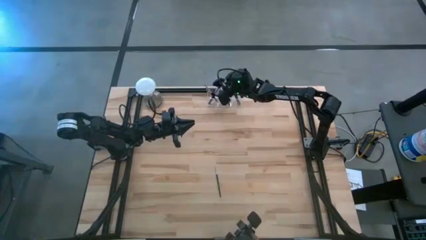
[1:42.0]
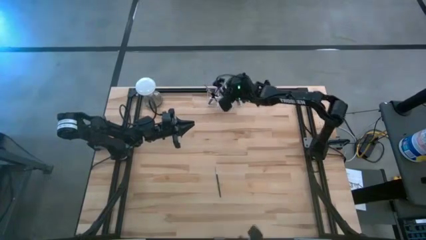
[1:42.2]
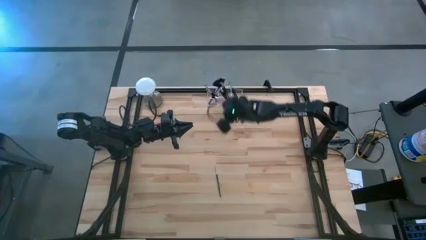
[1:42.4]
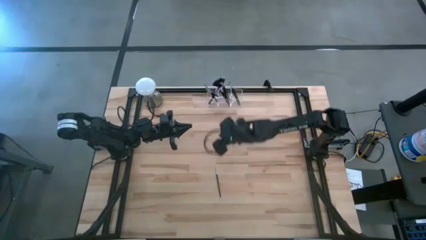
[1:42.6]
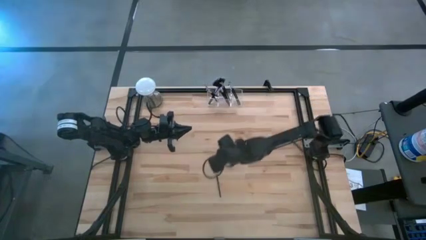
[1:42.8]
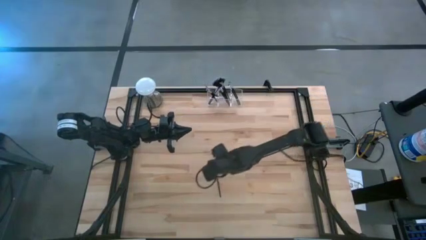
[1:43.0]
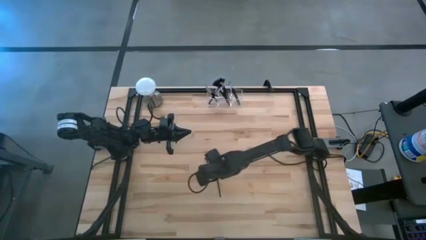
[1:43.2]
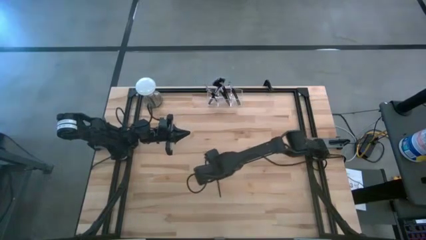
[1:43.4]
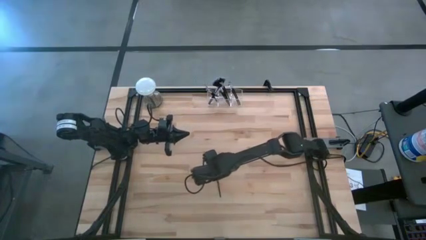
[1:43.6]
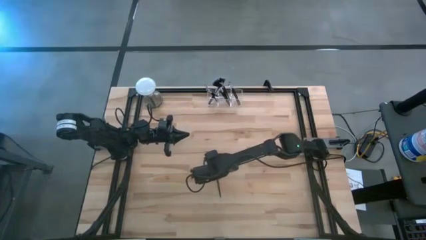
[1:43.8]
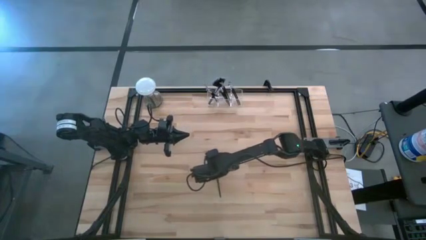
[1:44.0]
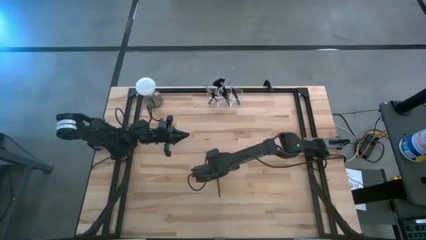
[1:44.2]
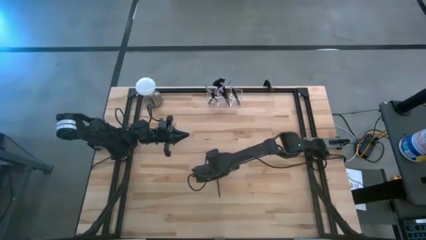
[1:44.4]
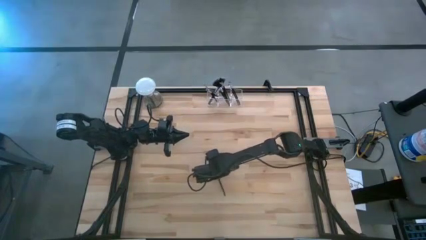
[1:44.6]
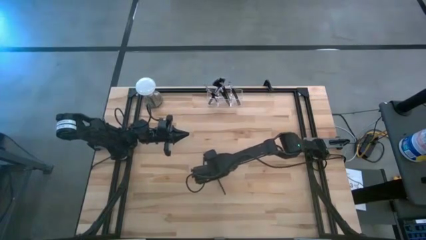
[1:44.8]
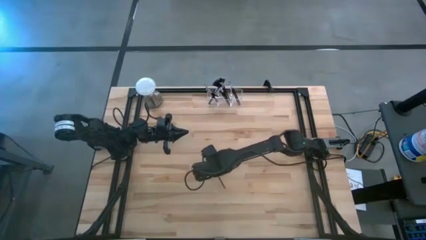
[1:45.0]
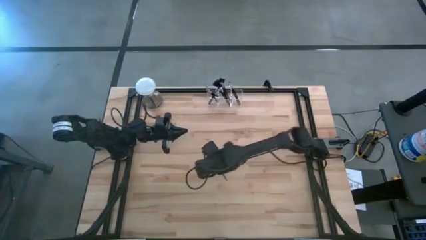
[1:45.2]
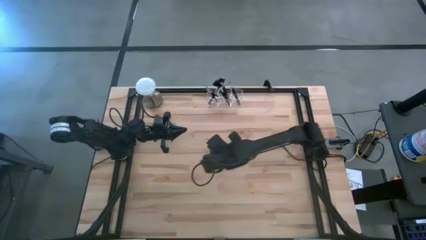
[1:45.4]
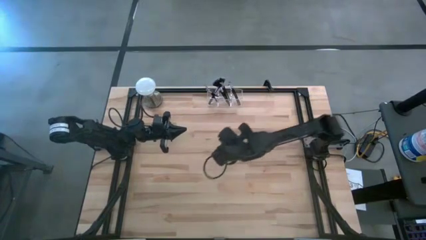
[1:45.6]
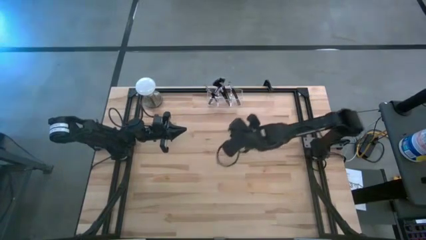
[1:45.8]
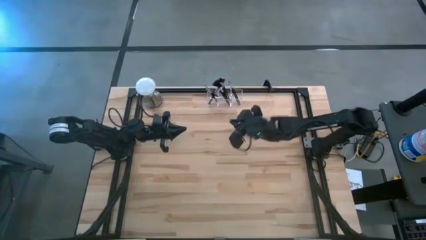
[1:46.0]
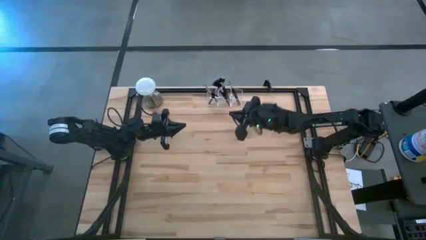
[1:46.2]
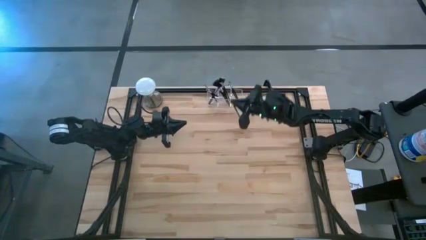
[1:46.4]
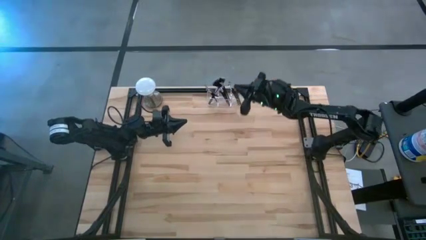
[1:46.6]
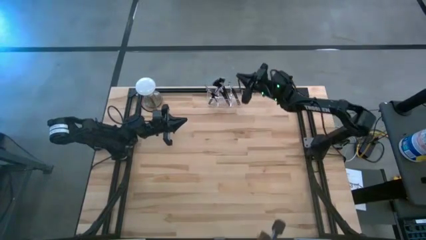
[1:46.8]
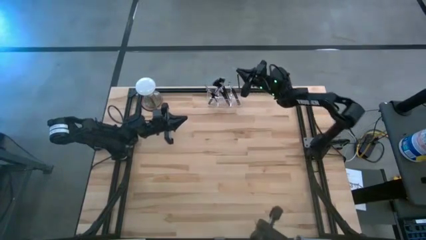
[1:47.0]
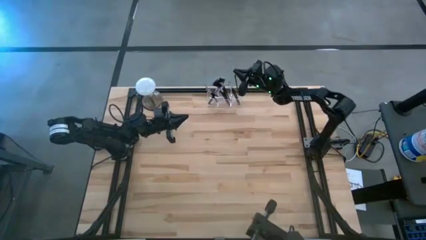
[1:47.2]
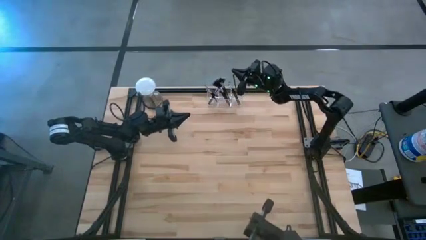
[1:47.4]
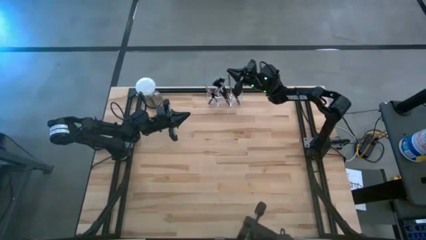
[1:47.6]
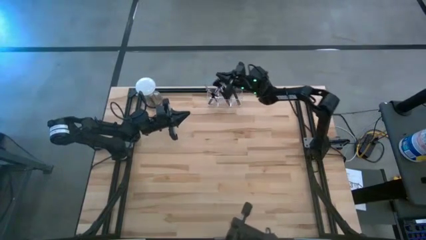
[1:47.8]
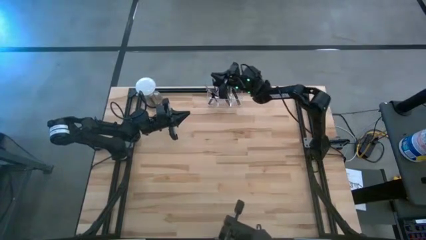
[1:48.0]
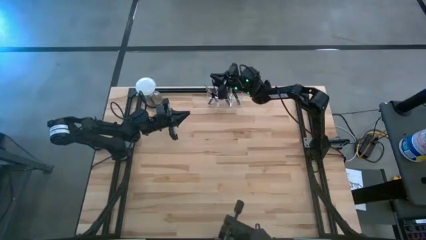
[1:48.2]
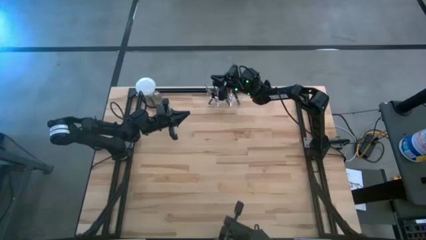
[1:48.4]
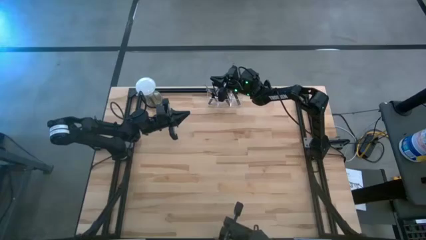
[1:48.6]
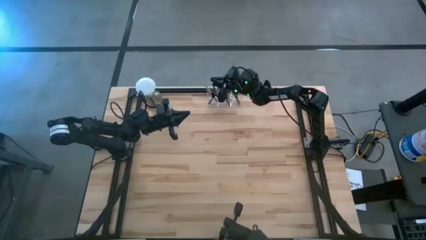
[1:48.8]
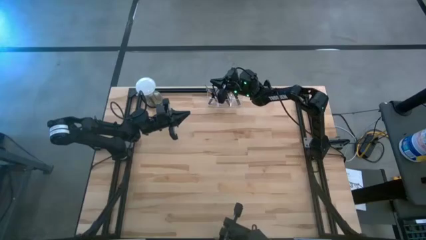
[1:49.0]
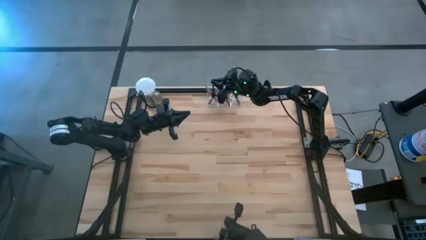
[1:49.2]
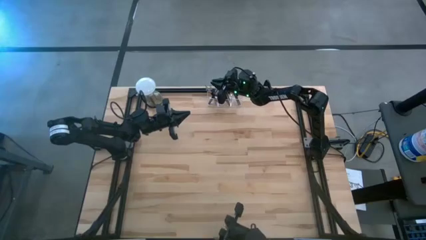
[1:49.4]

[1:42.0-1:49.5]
Task: Pick & Place Makeup Brushes
Put the black liner brush into the transparent organizer

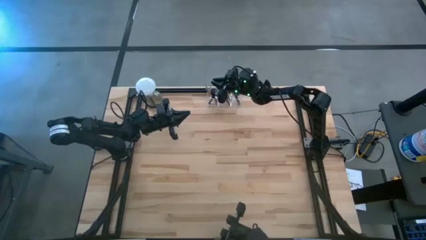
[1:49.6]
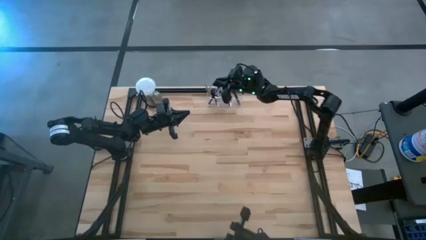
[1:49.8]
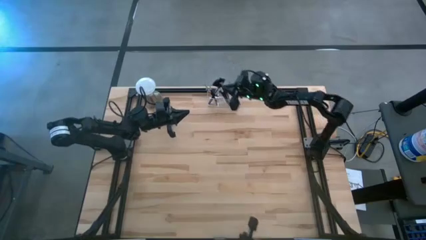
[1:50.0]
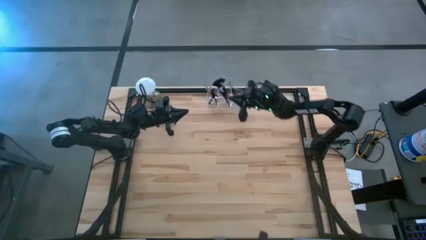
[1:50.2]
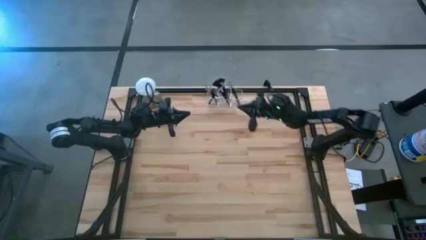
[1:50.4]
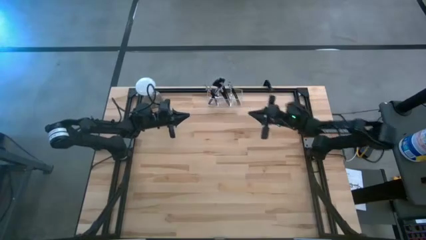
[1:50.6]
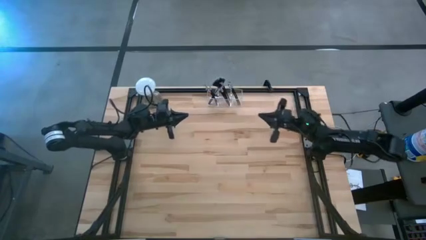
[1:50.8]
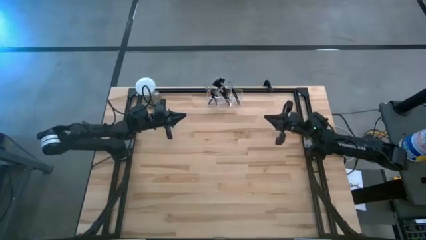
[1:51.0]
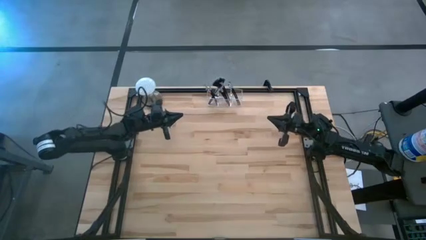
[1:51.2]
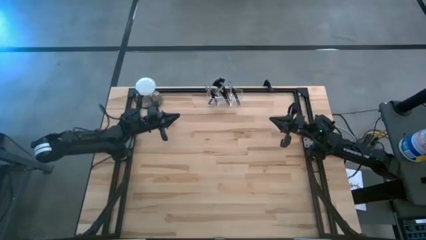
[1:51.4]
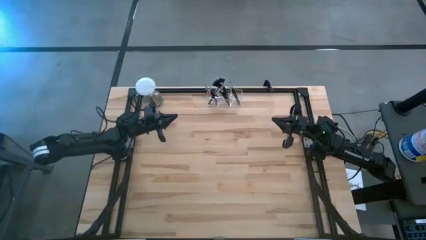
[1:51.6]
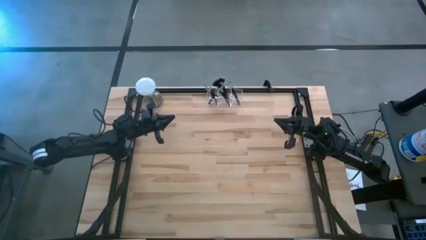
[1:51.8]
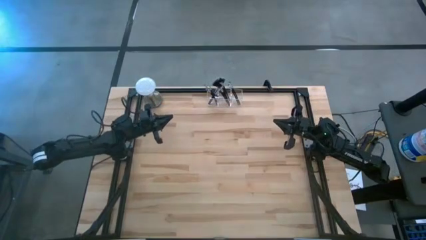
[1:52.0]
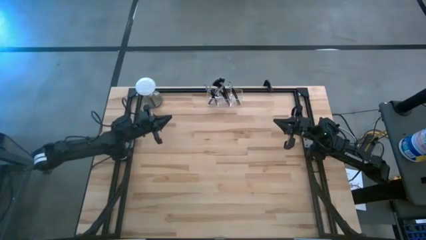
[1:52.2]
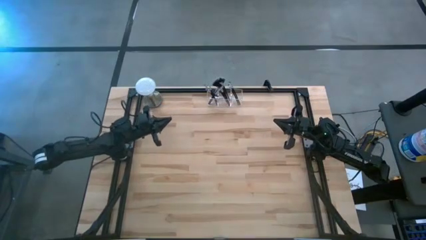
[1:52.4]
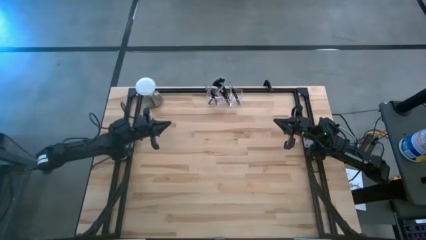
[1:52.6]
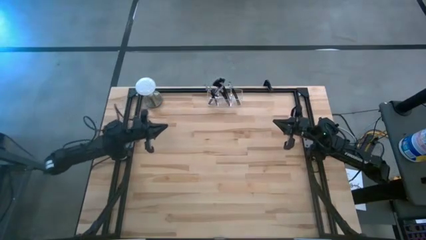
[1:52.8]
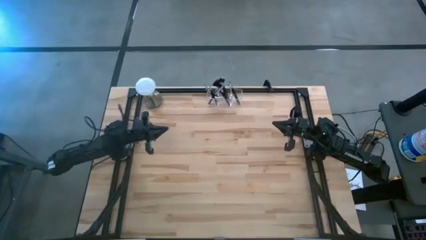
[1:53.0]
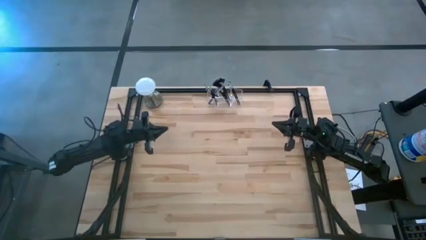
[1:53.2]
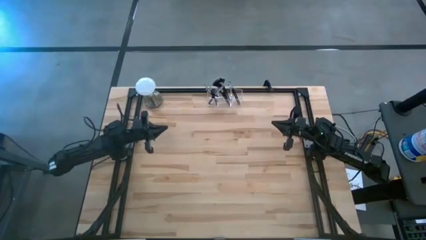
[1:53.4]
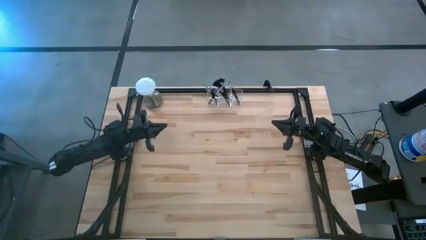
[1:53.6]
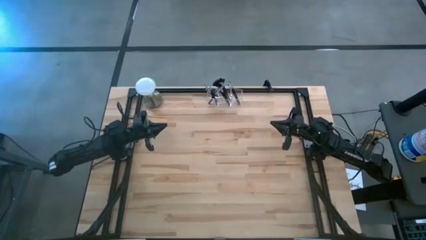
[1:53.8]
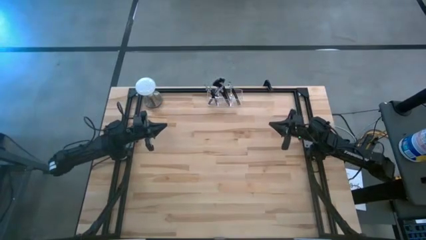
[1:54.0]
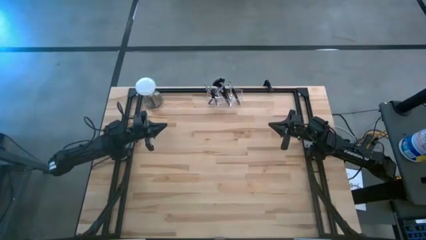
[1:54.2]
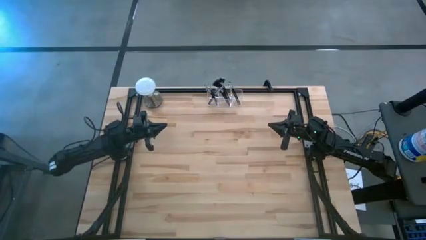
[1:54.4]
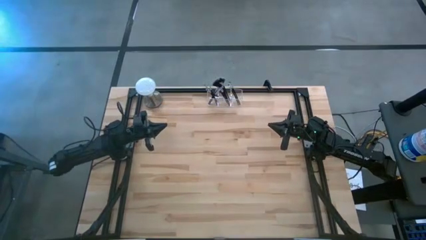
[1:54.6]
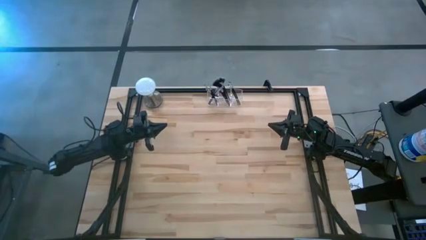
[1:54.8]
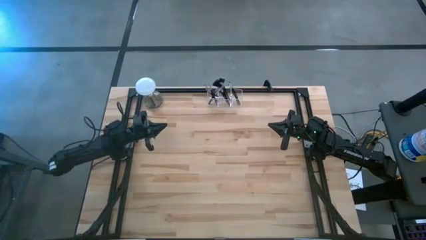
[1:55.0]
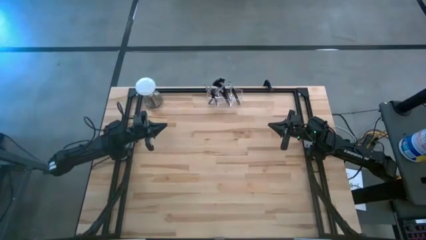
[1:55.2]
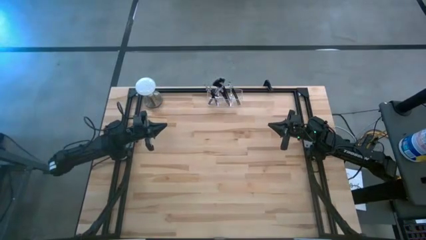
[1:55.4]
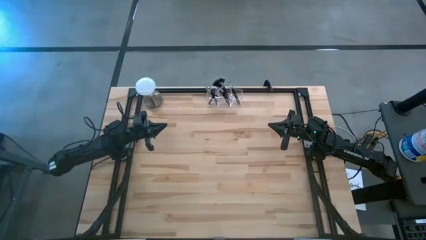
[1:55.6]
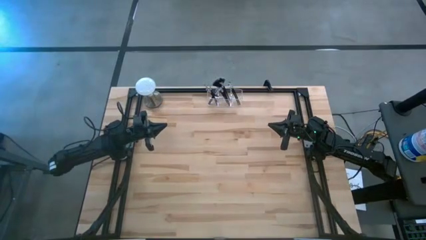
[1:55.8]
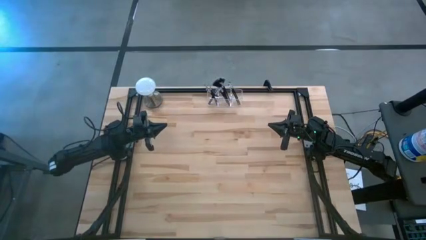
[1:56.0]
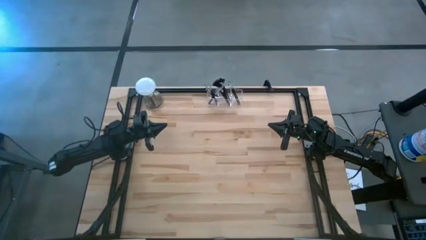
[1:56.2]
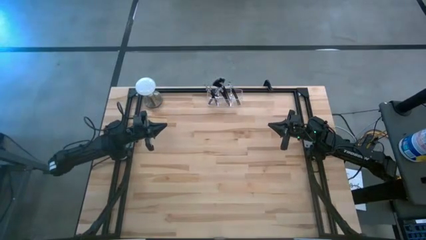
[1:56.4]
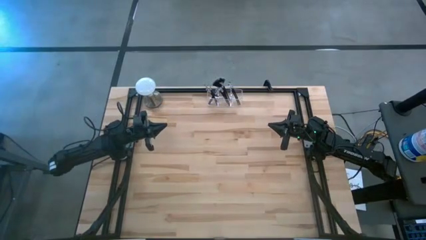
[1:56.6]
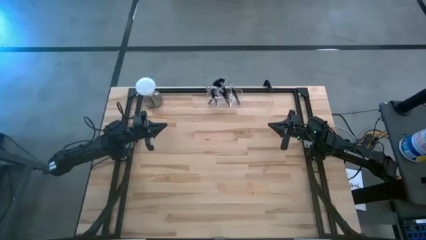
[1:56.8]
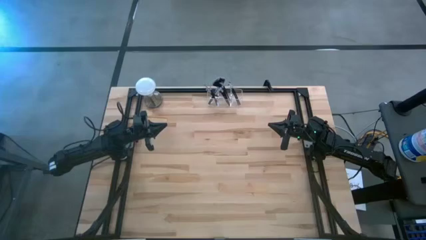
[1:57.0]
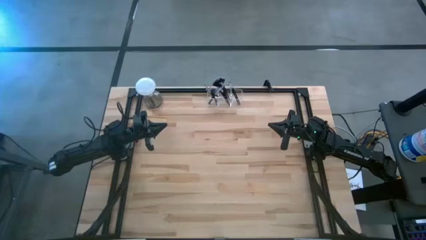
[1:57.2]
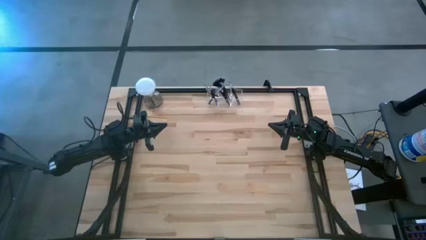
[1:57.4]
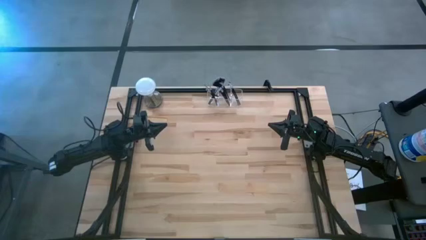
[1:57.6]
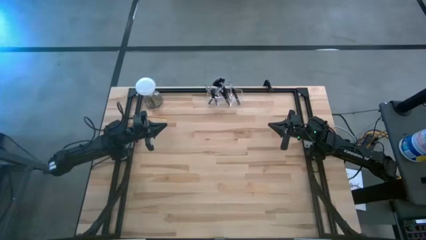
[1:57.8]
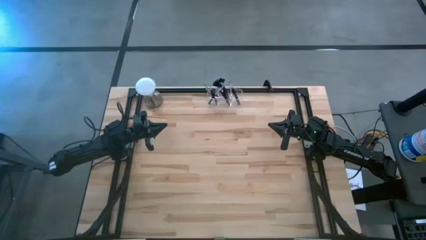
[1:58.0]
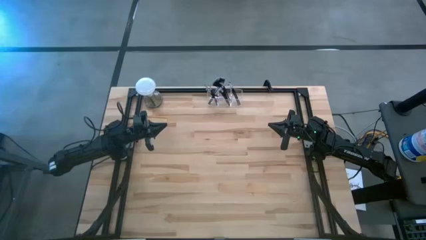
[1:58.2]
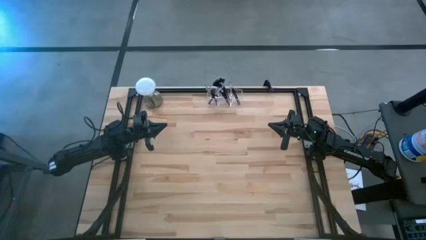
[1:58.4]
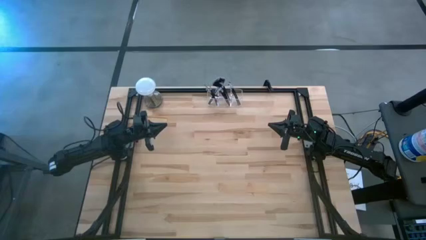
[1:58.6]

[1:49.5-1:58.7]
Return to home position
